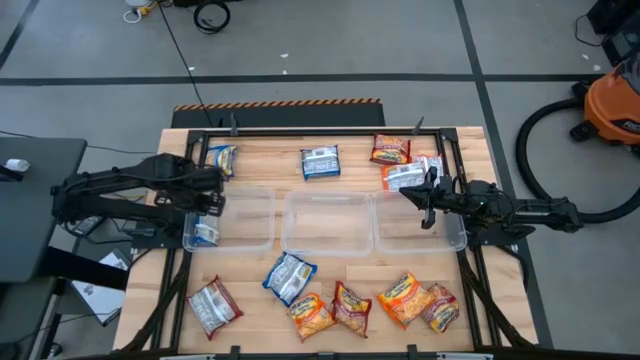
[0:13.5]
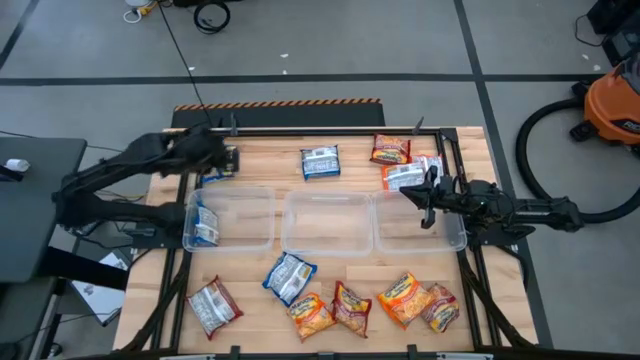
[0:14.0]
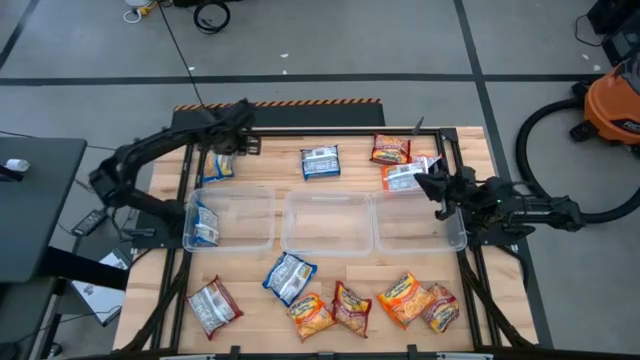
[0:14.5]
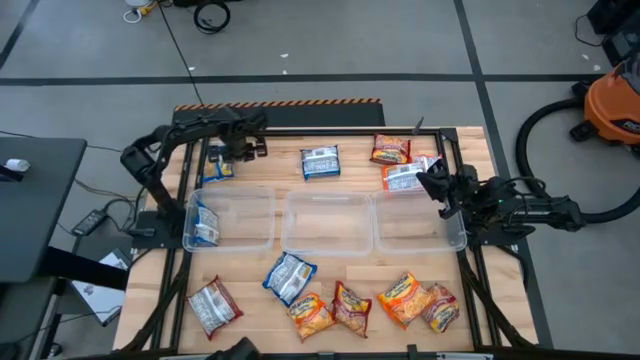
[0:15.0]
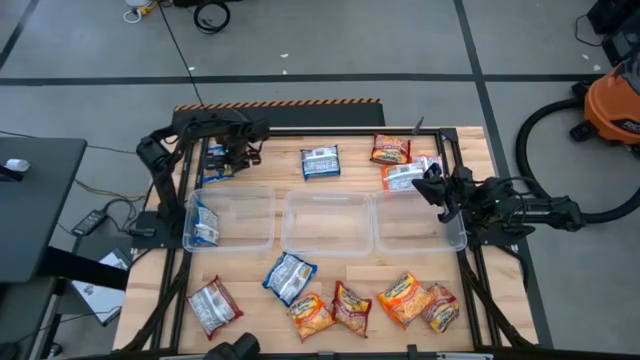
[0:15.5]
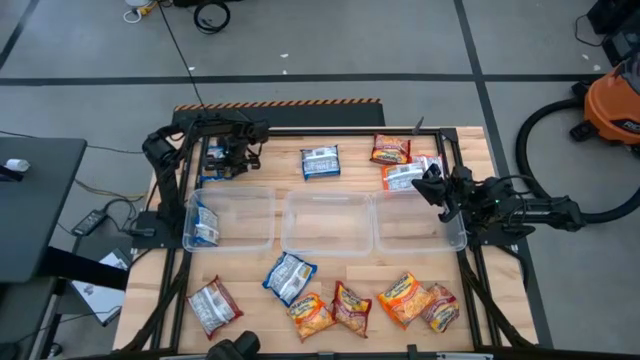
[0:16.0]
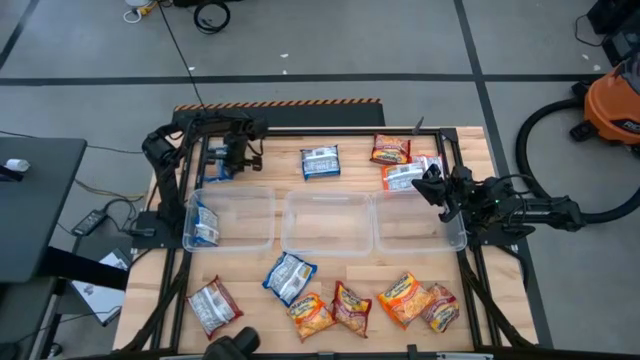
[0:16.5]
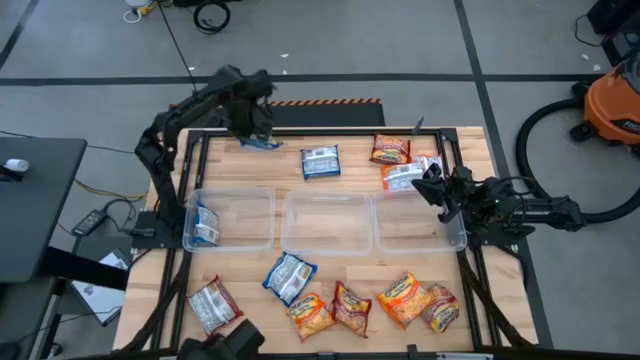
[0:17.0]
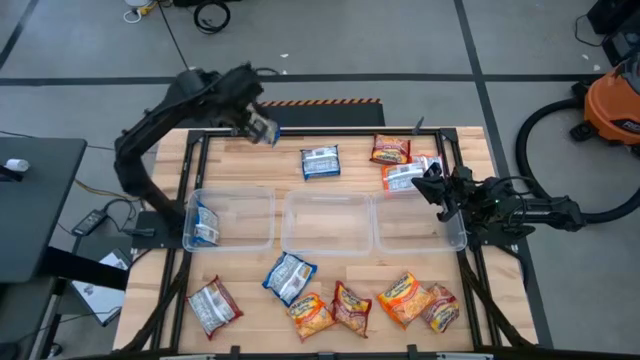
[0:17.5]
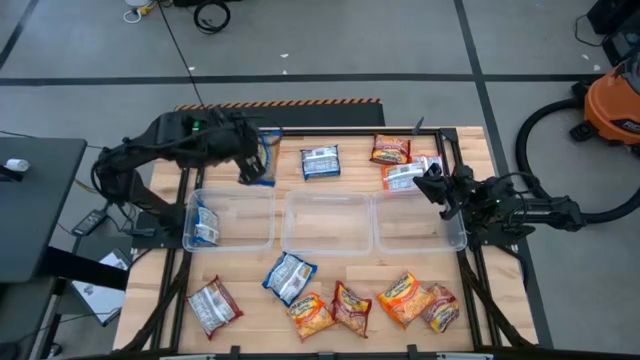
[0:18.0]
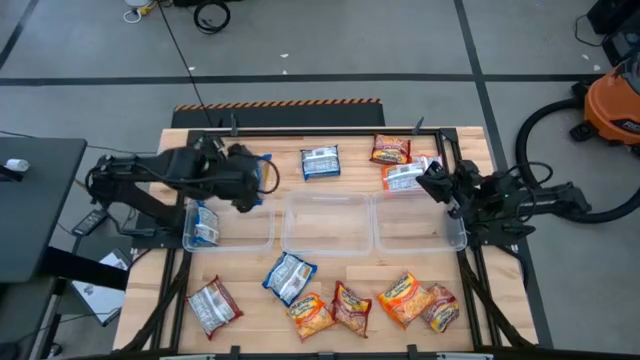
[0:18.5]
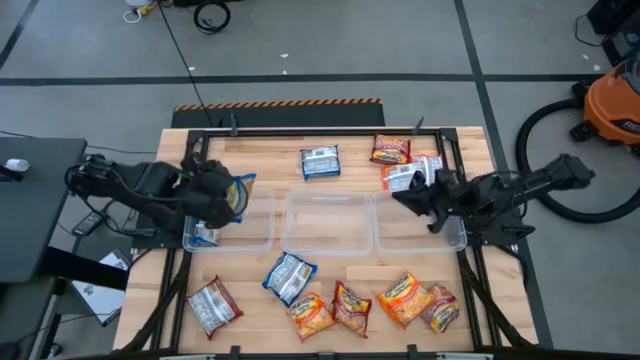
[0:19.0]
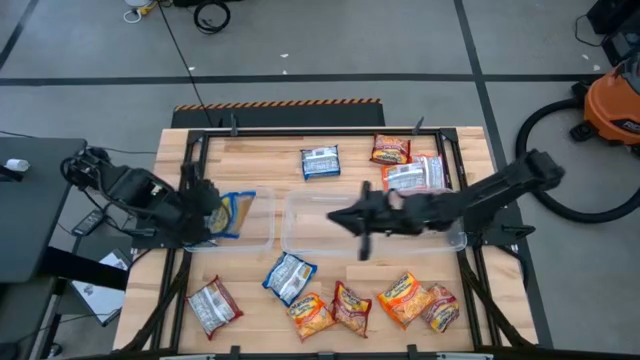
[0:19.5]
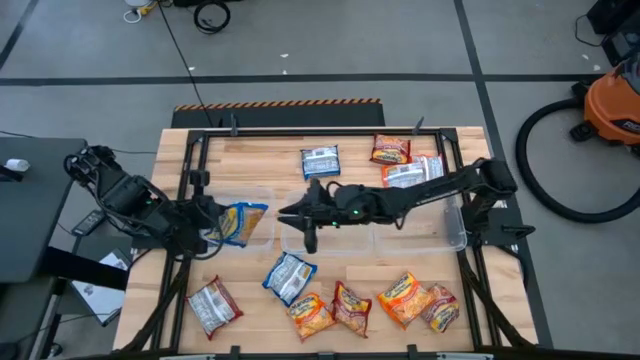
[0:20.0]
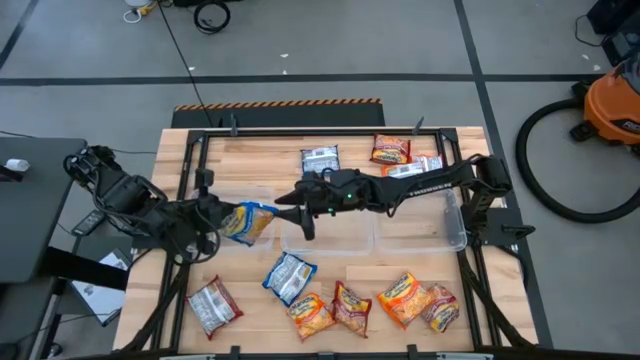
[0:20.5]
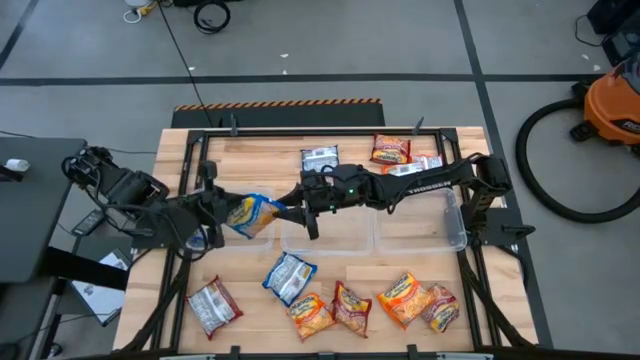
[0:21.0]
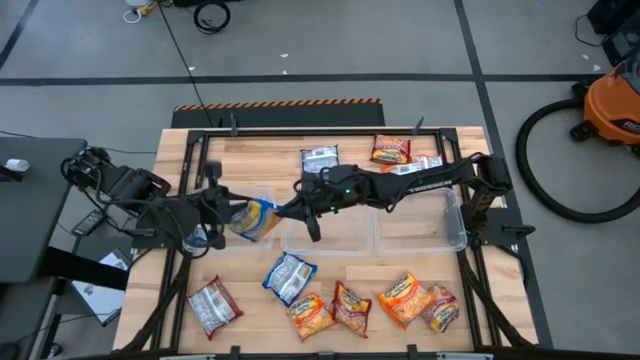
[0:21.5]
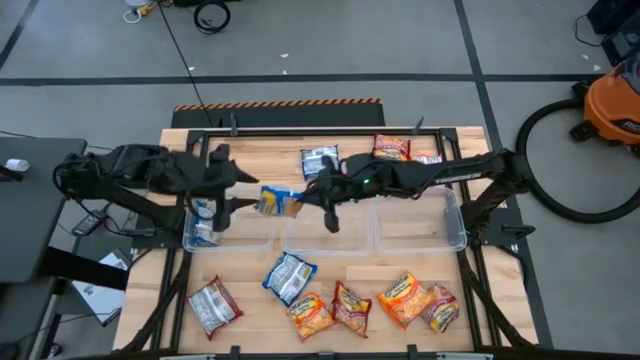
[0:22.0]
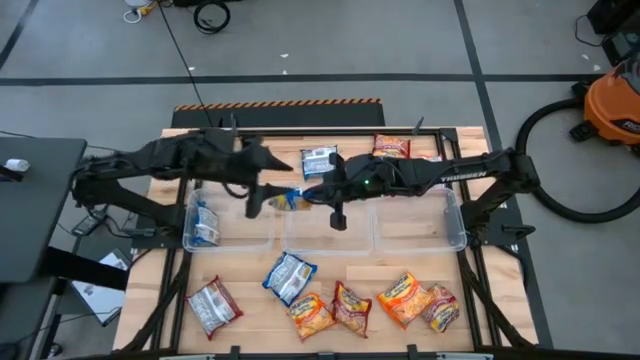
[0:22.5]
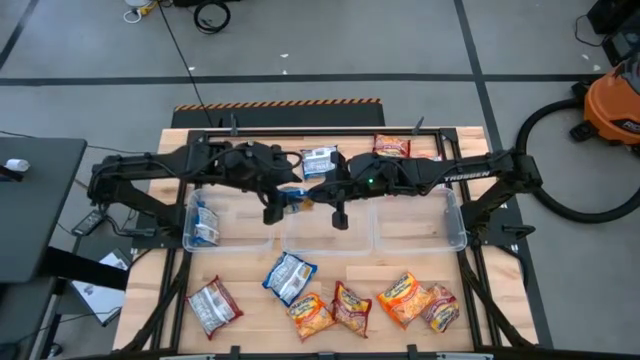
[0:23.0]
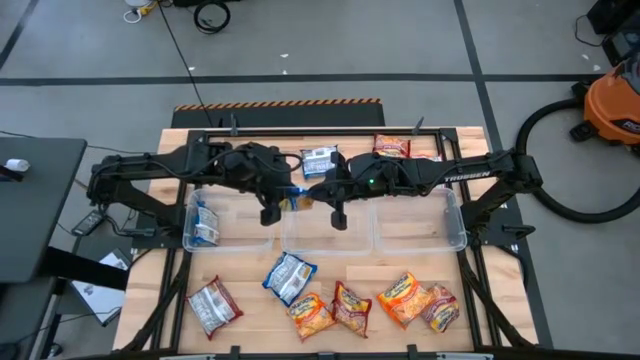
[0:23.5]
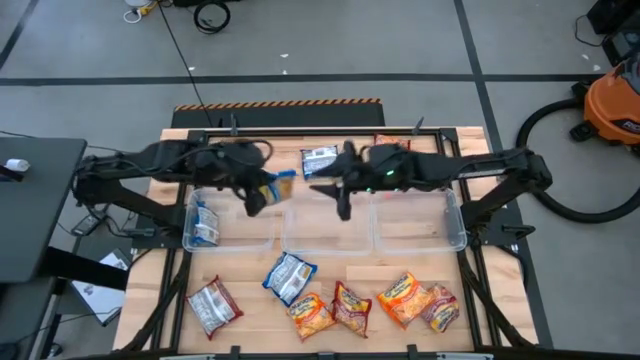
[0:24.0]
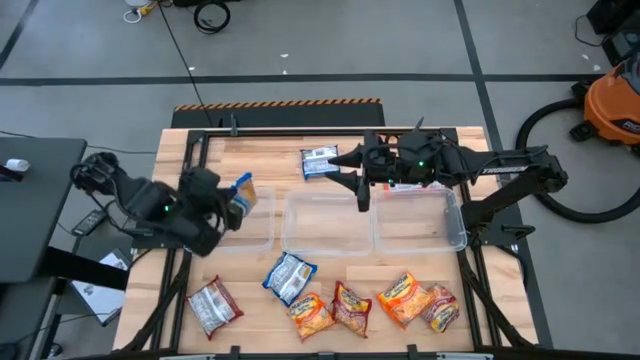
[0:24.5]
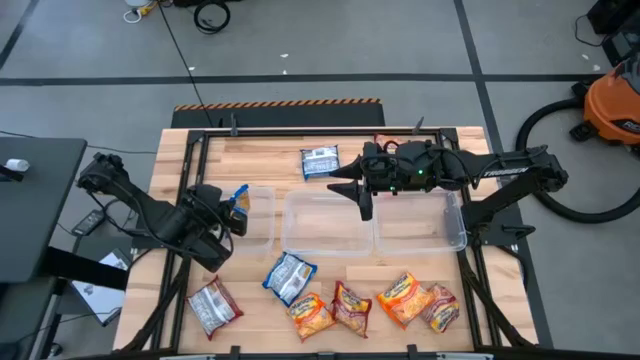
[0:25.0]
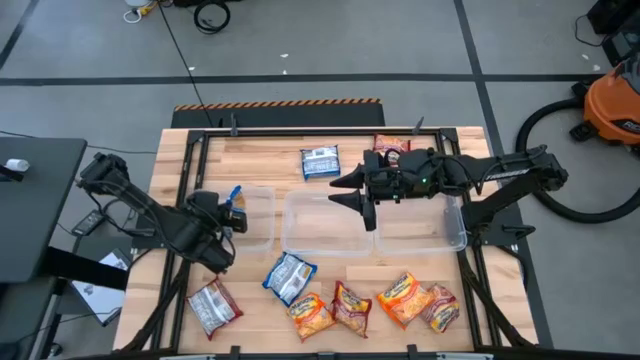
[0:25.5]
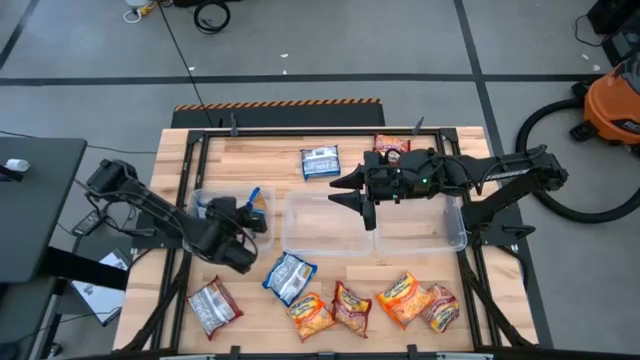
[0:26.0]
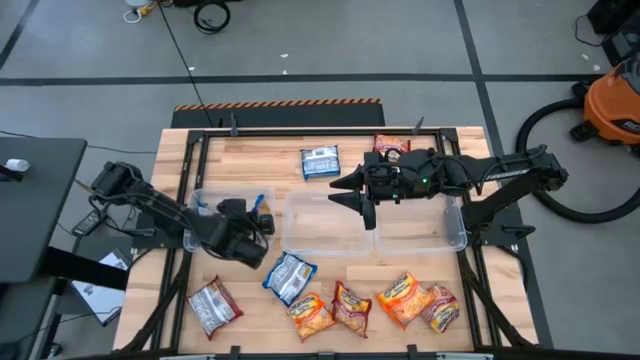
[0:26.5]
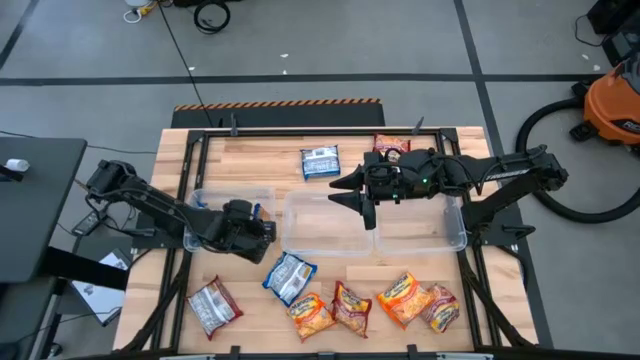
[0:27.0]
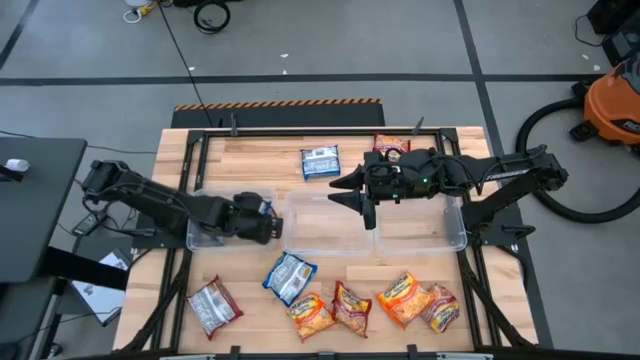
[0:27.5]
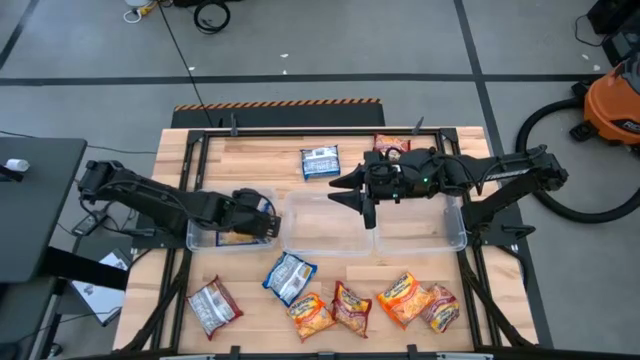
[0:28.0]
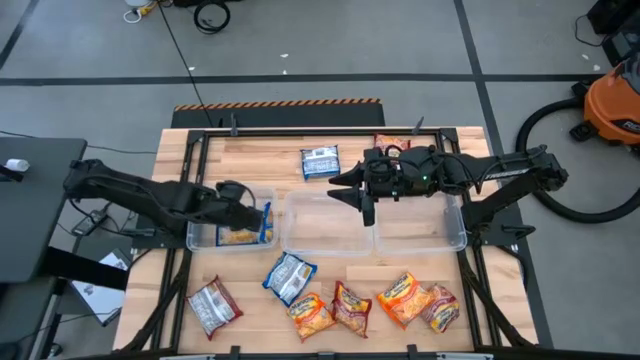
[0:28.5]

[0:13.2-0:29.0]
Task: Sort Maruchan noodles
Put the blue noodle pack into the left transparent bin

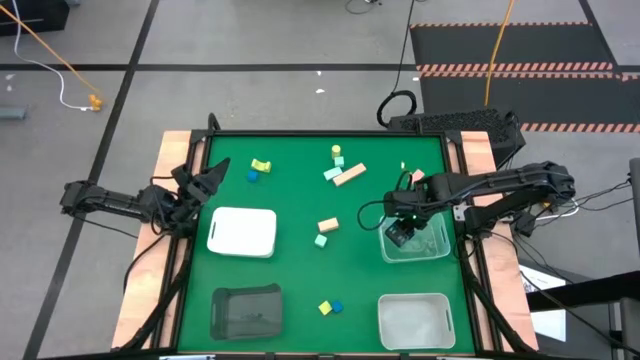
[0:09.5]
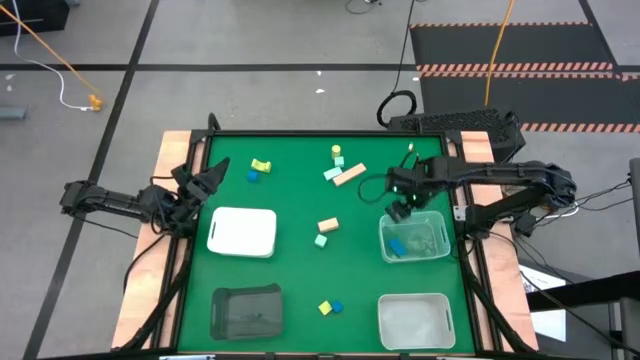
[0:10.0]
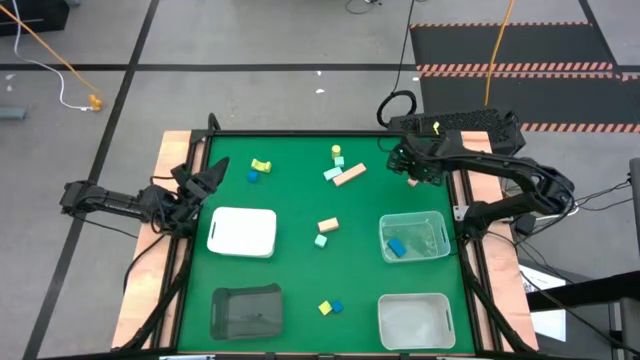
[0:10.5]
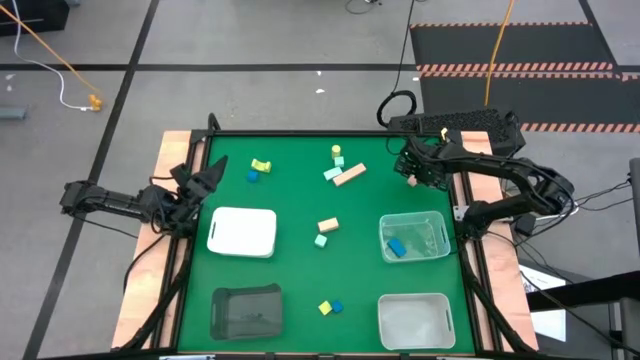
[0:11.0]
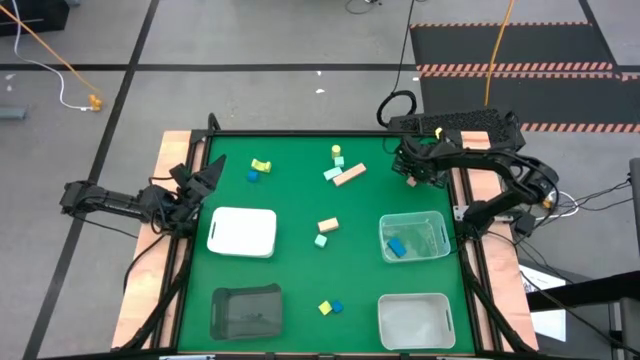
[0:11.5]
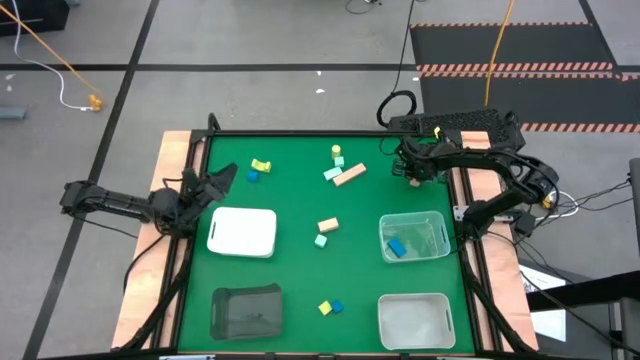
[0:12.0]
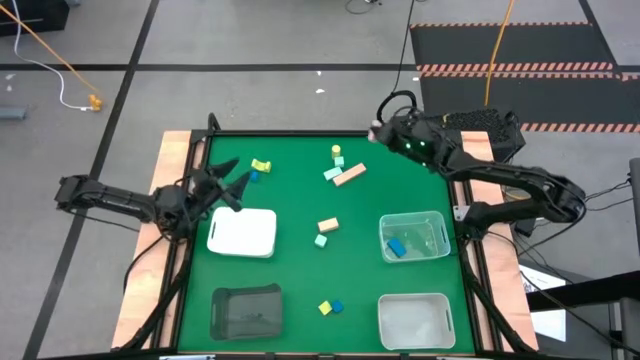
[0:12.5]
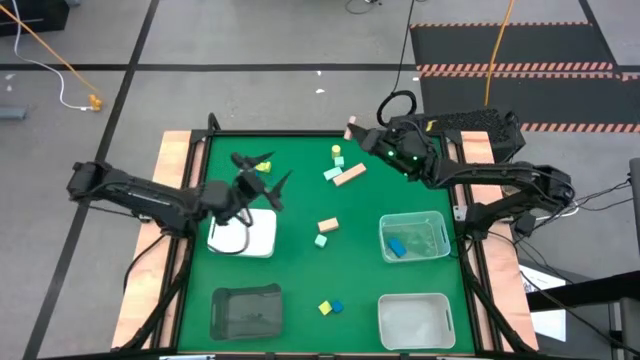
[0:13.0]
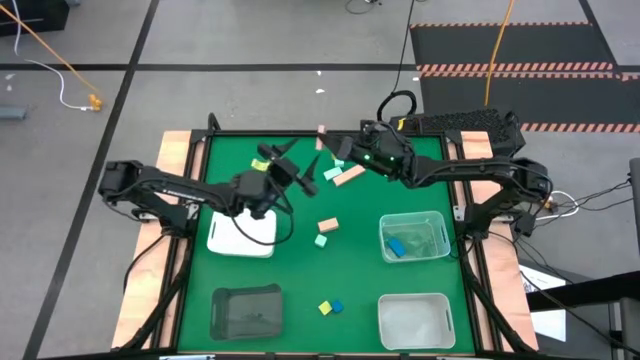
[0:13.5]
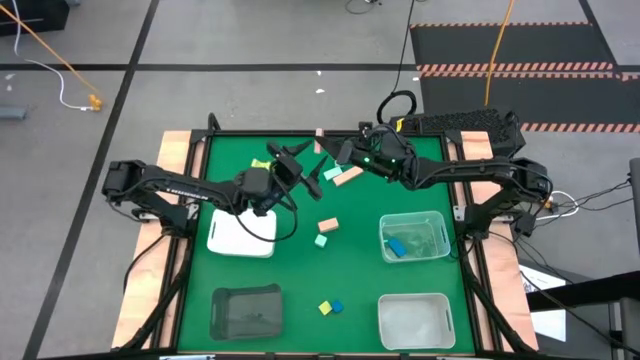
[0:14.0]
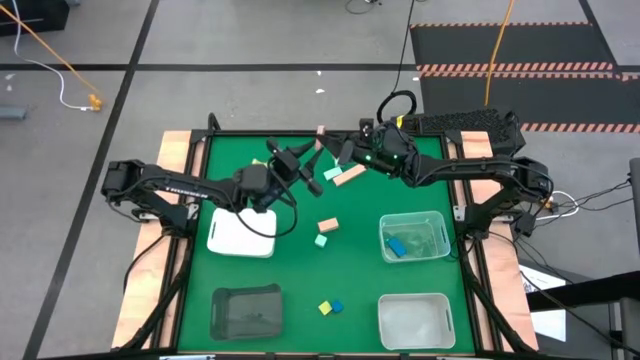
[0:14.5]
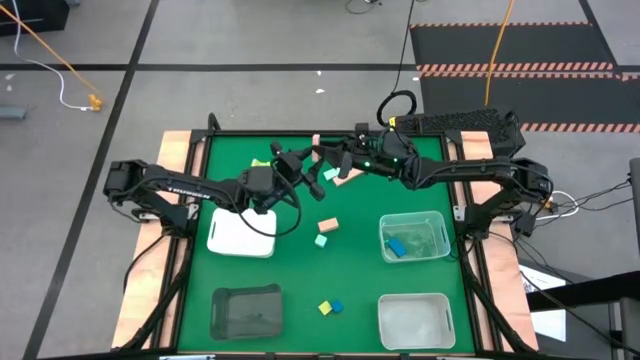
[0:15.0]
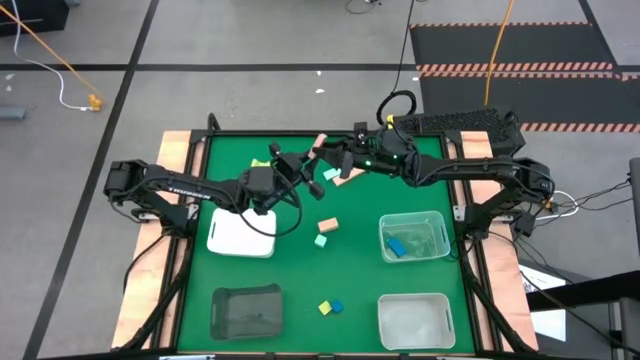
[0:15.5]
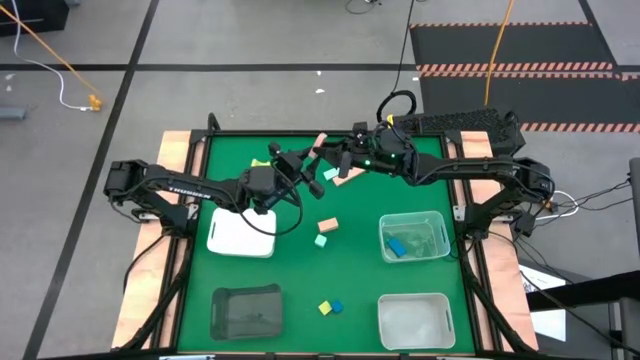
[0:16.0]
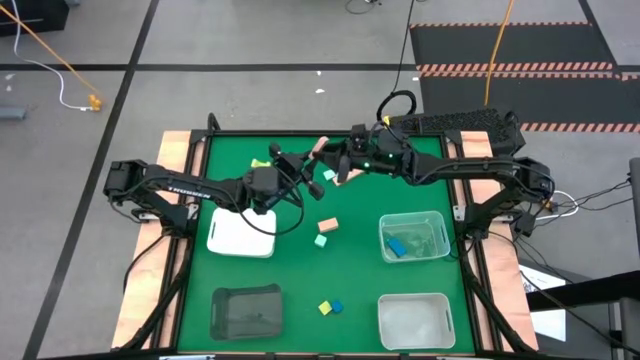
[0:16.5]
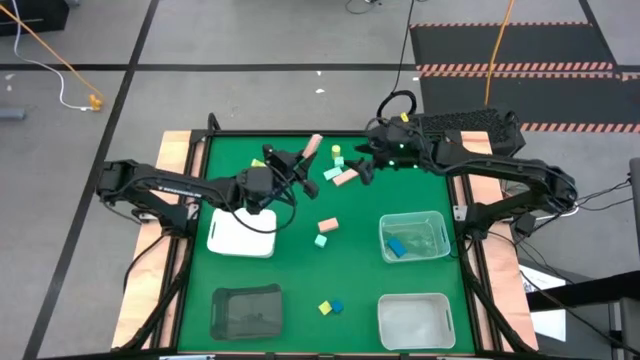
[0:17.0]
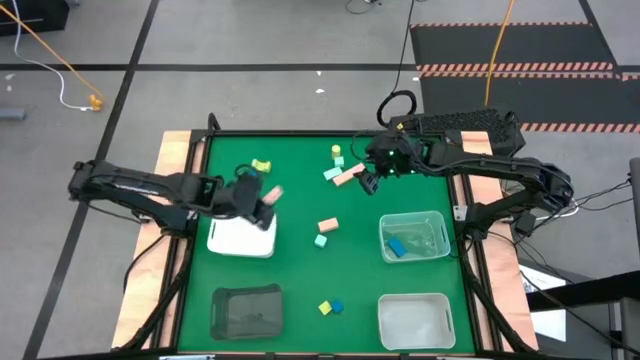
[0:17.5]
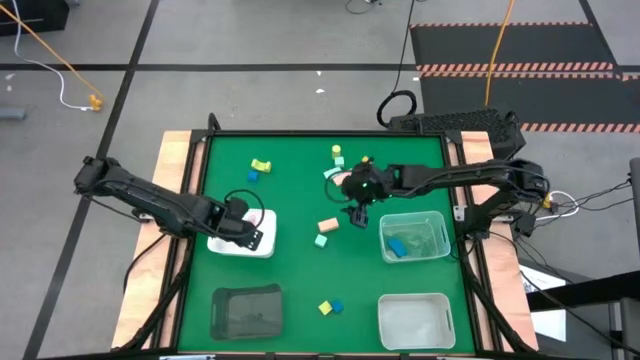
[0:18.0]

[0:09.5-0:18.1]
Task: Sort & place blocks by color
Put the top right light brown block into the white bin
